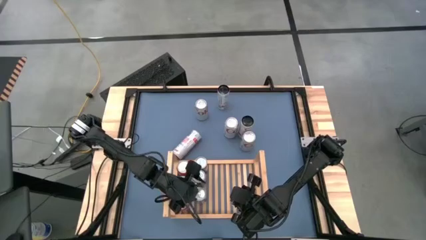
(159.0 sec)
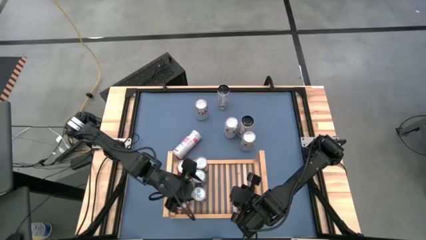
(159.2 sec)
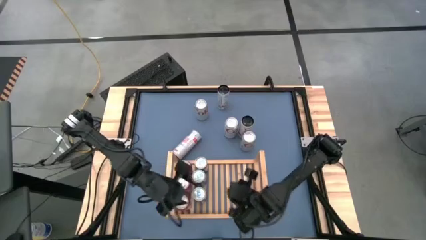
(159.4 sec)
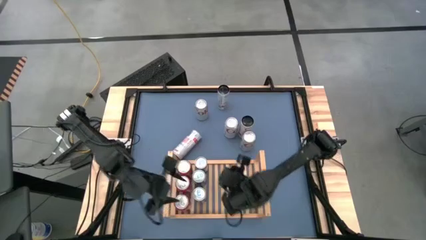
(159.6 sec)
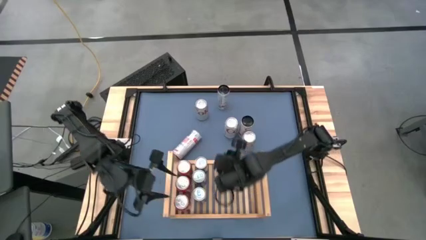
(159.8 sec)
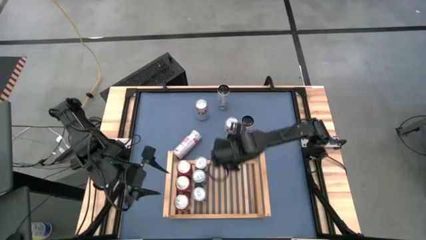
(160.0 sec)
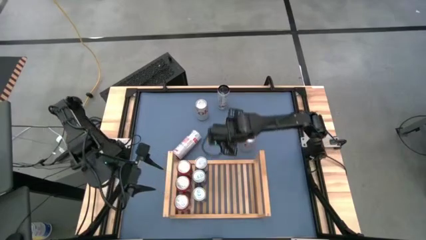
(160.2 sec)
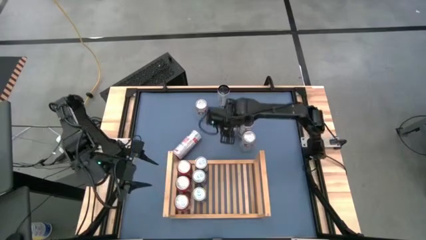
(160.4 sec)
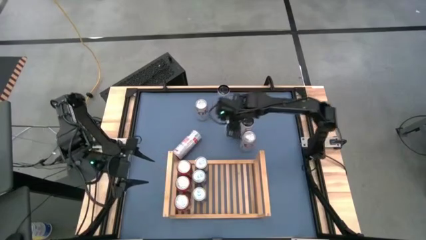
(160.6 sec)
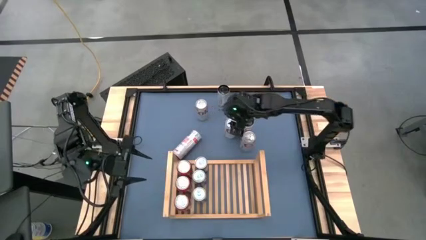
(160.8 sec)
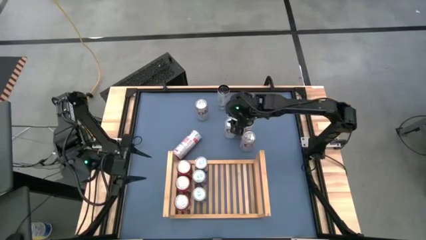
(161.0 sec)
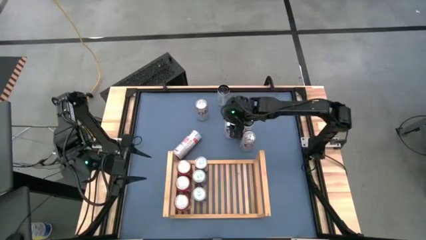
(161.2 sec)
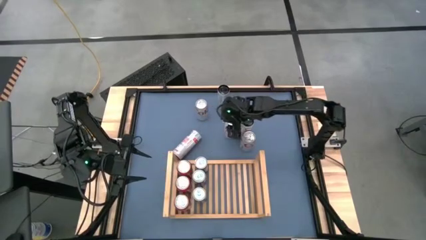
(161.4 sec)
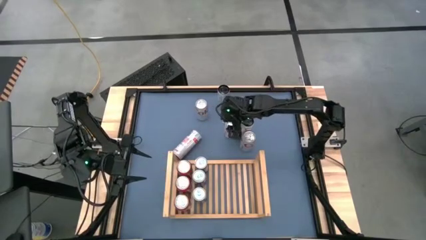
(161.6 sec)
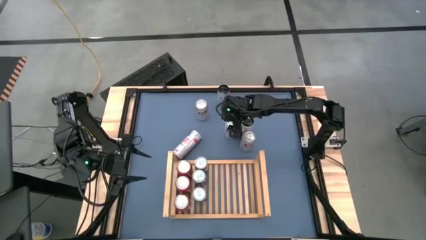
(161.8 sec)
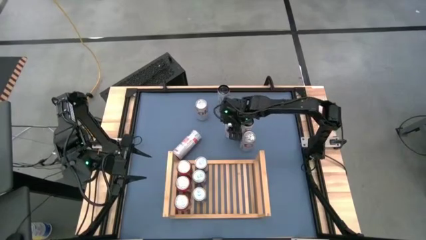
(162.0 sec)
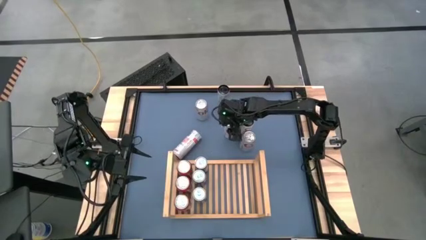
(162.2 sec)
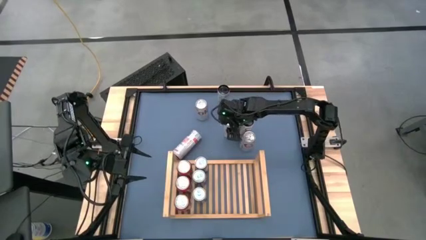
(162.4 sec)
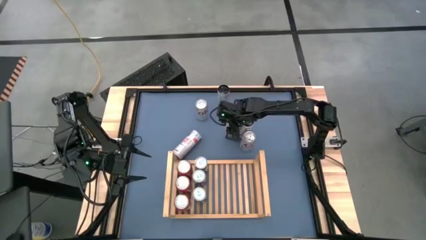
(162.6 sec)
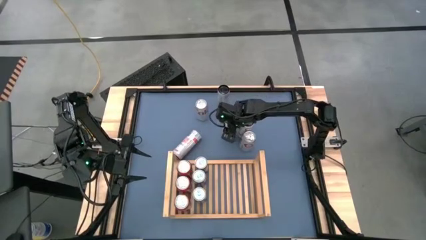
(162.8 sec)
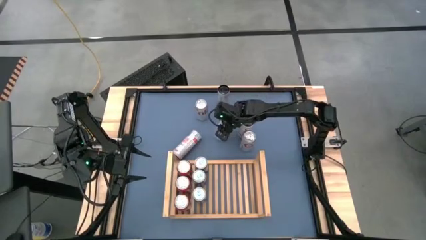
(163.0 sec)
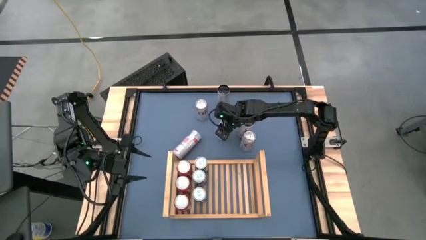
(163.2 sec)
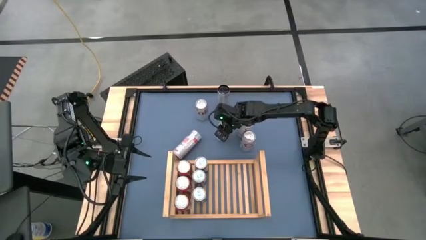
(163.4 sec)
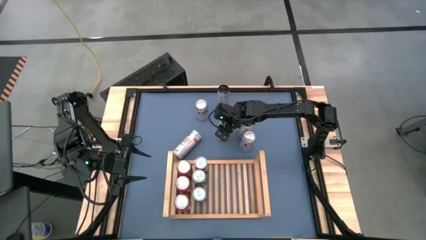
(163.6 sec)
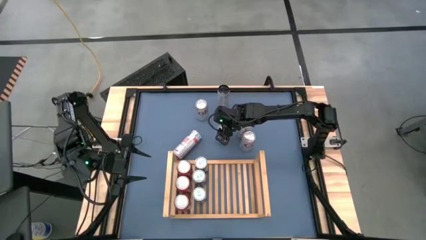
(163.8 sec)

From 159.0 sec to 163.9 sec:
Task: Place canned beverage on shelf
Put the middle red-silver soda can on the shelf

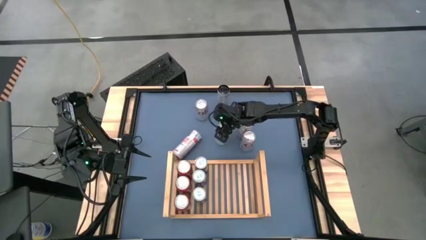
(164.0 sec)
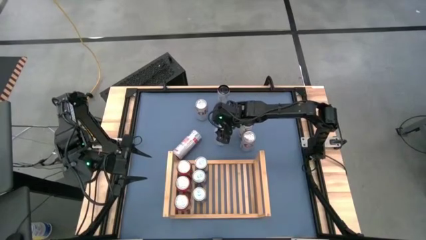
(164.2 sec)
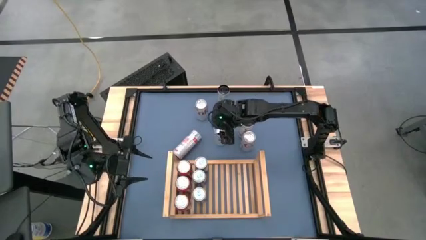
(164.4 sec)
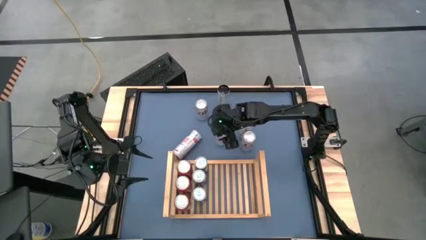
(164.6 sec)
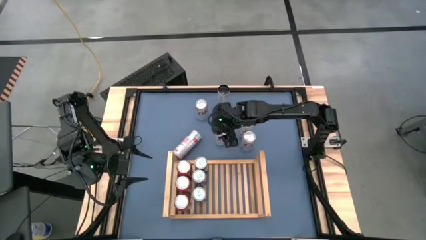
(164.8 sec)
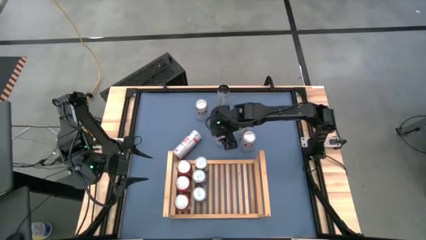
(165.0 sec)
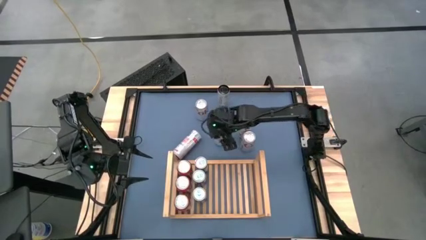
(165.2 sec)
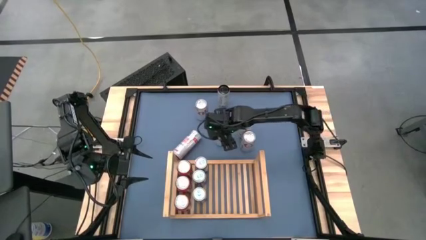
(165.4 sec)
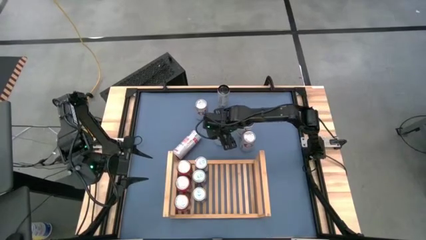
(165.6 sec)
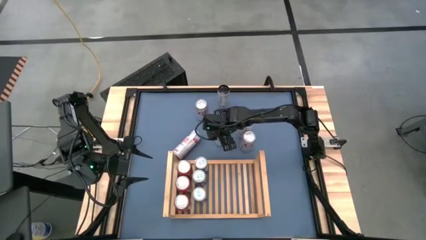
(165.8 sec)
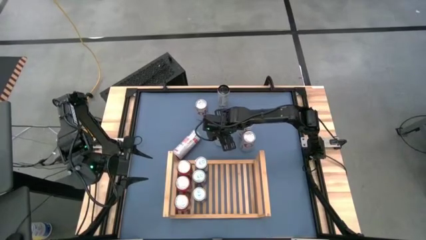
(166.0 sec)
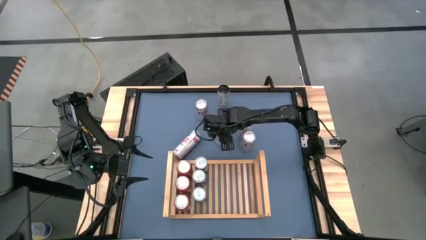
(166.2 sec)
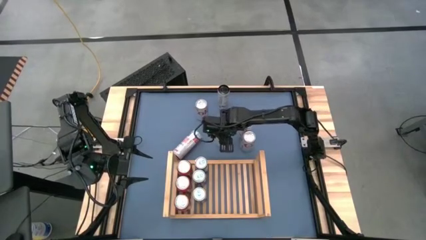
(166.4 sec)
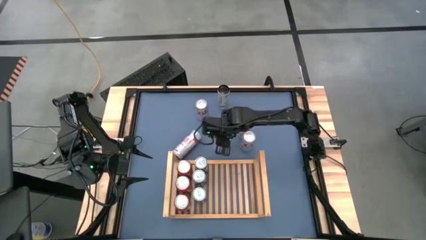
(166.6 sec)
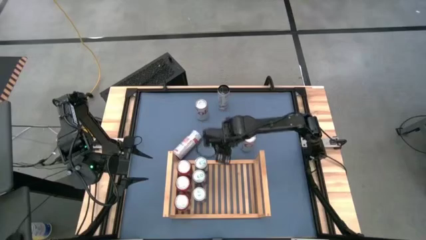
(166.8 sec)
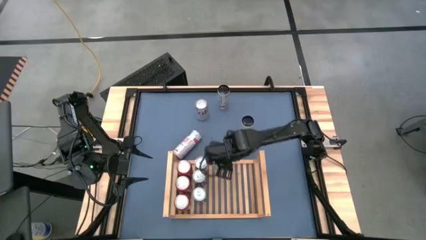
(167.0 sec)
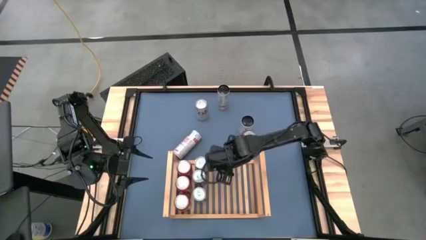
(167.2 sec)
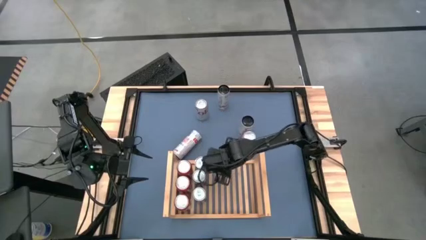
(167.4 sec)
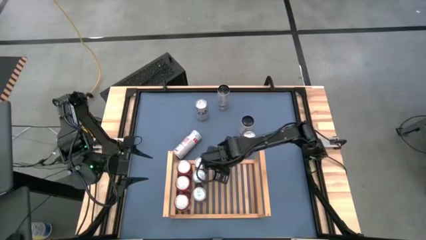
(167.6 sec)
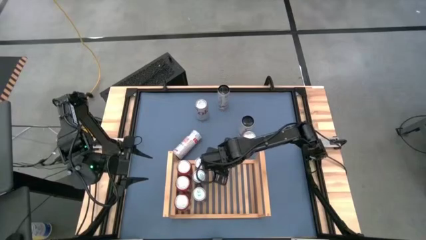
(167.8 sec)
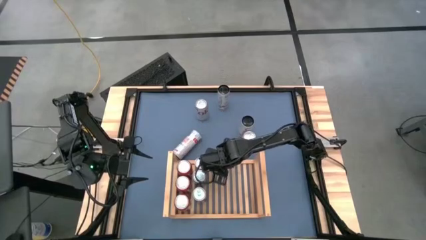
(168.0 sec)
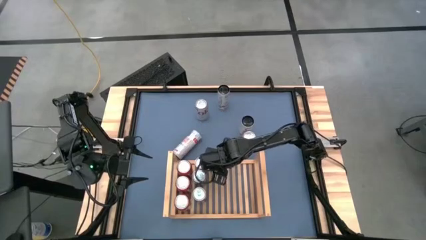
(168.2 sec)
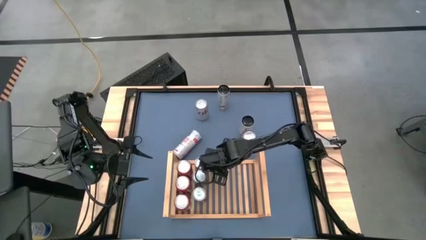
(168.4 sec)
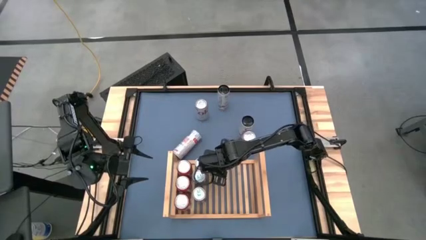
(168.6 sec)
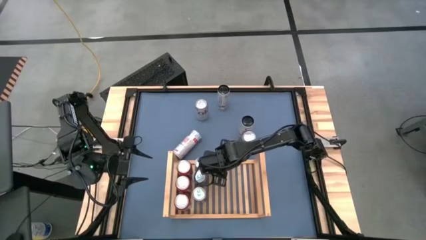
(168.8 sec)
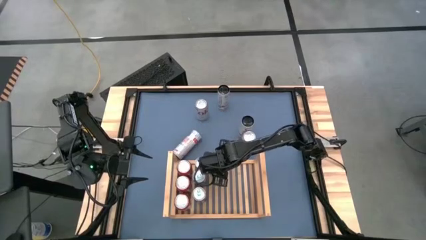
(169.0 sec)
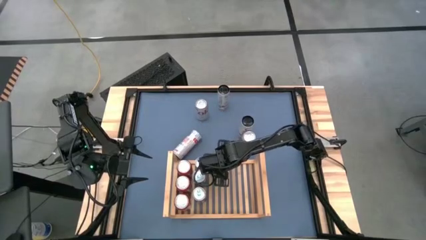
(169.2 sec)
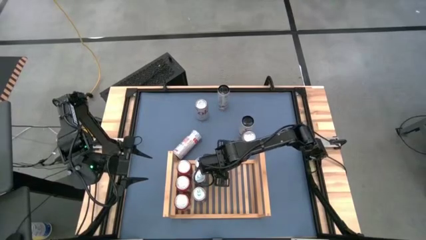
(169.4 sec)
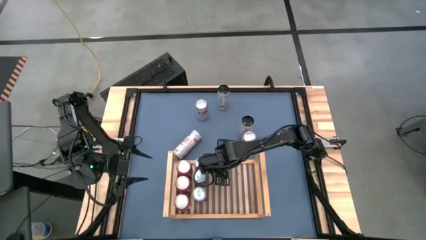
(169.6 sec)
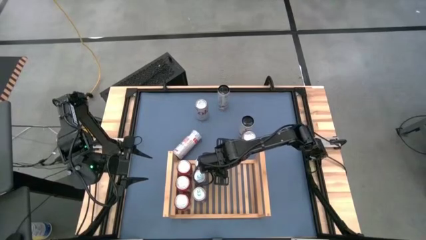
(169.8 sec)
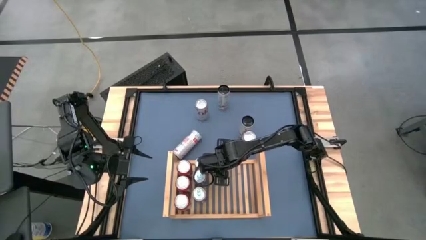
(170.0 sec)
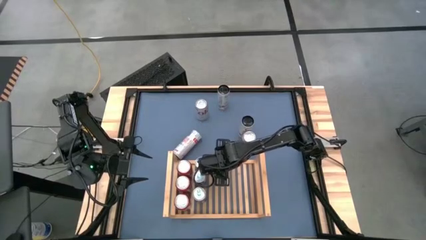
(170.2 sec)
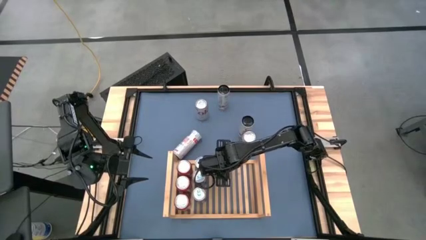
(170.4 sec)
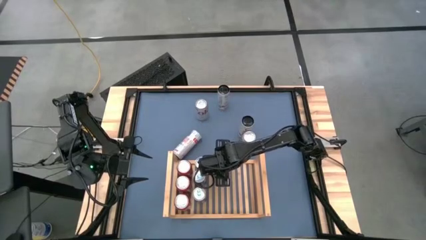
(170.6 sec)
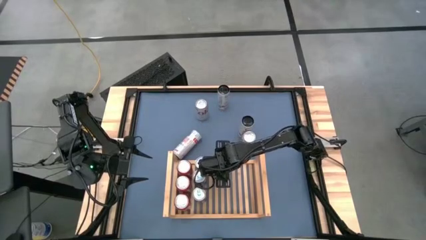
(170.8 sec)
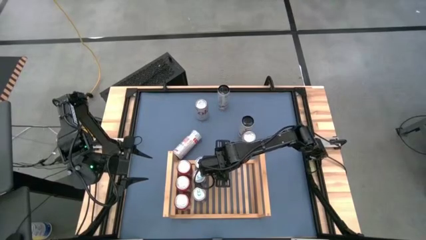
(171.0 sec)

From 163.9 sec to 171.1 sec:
Put the middle red-silver soda can on the shelf
